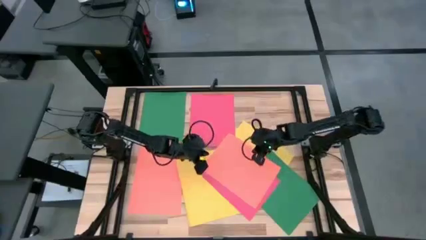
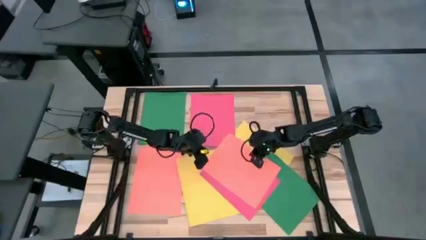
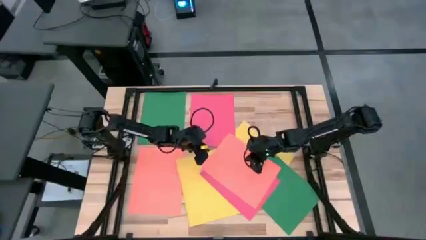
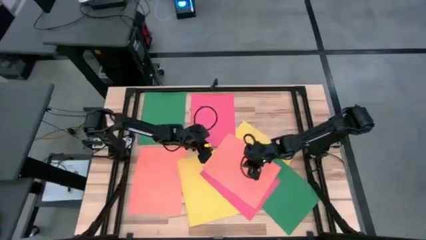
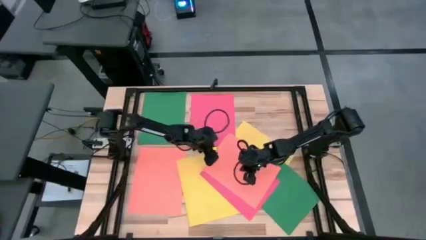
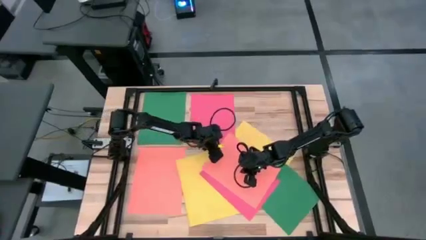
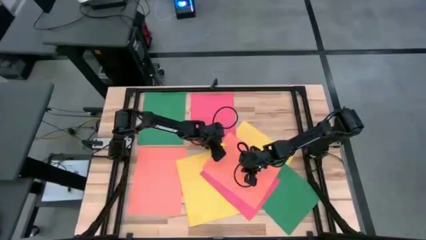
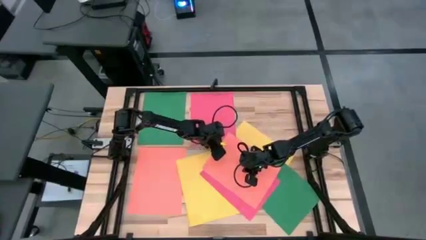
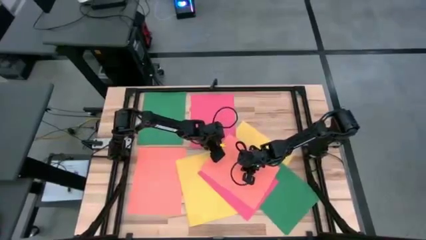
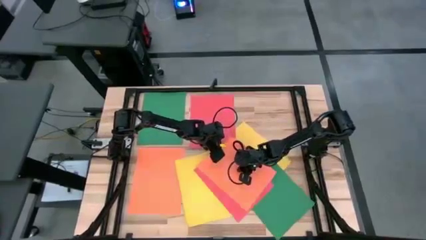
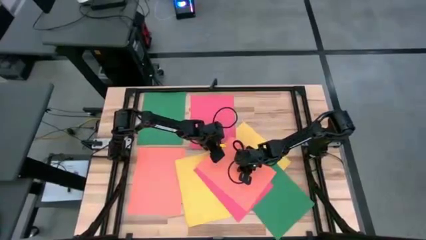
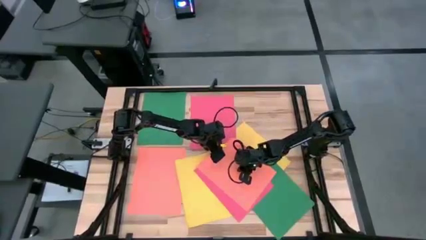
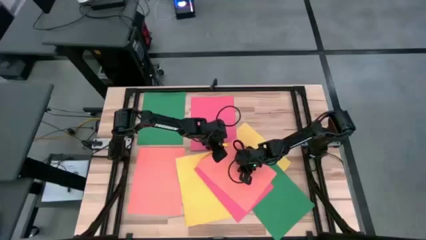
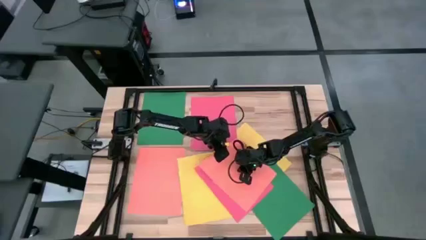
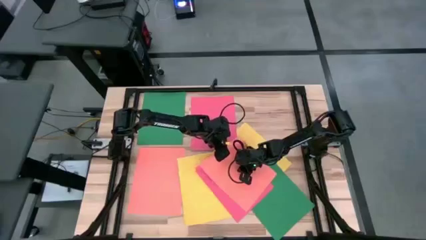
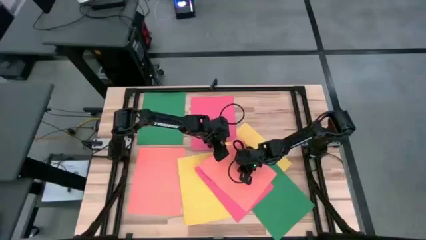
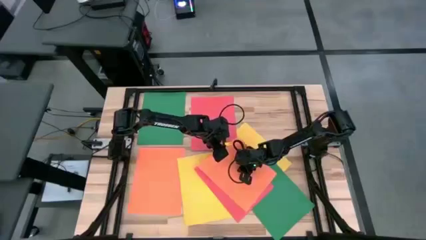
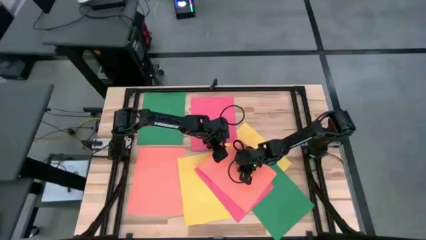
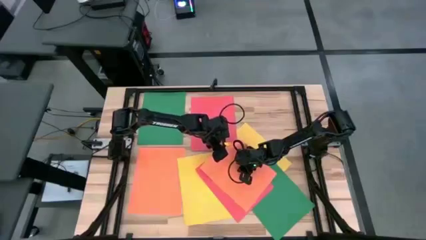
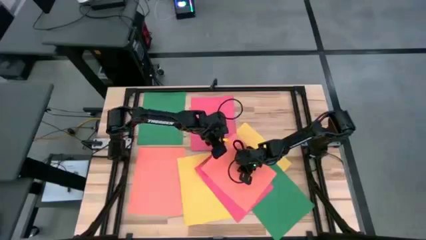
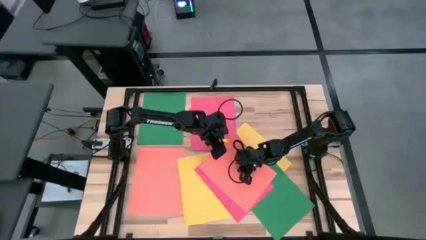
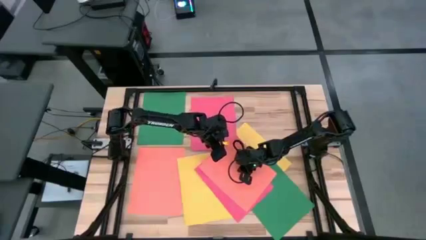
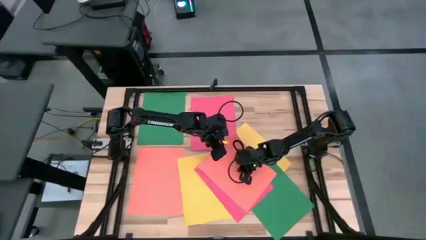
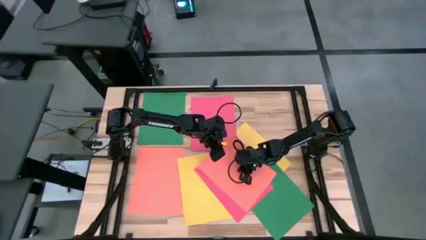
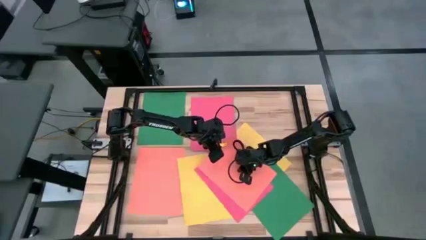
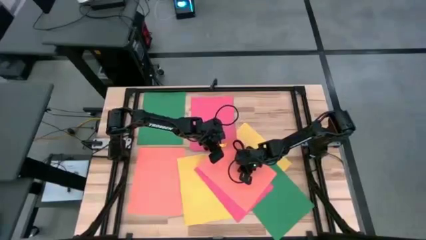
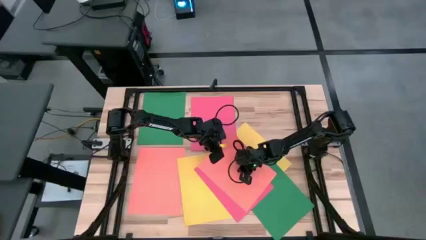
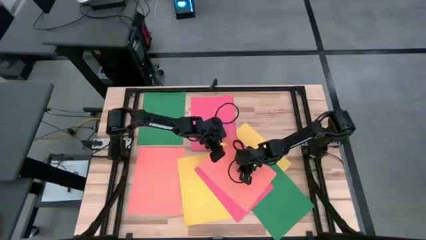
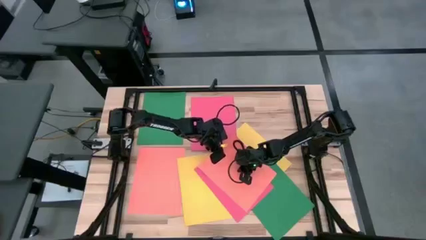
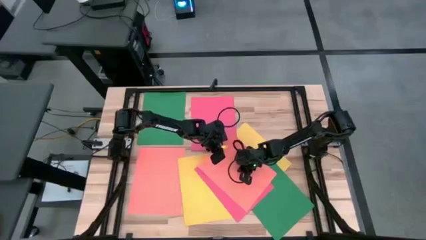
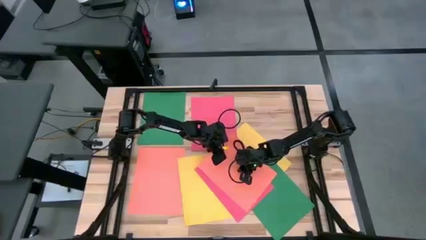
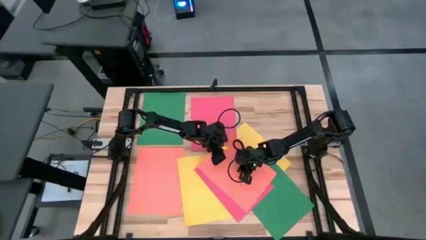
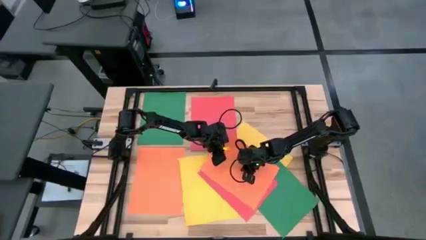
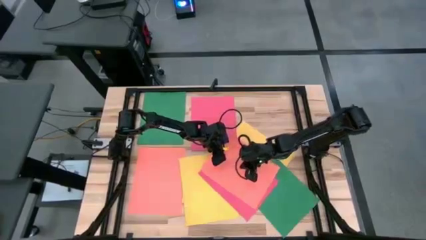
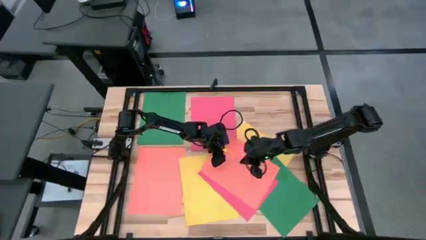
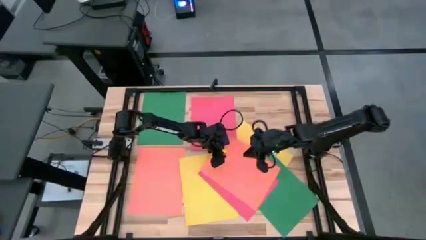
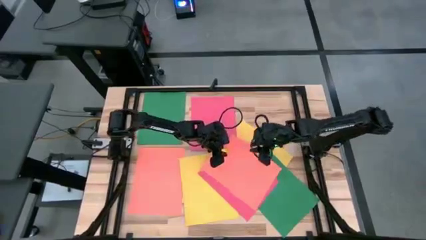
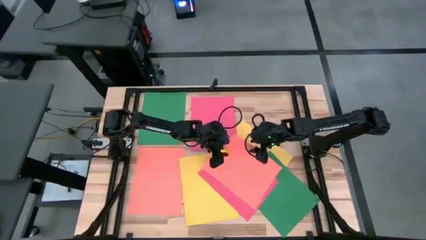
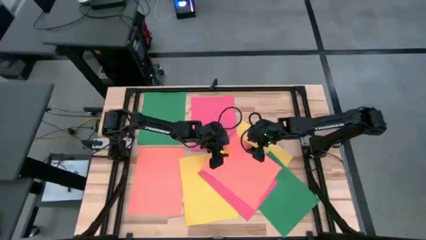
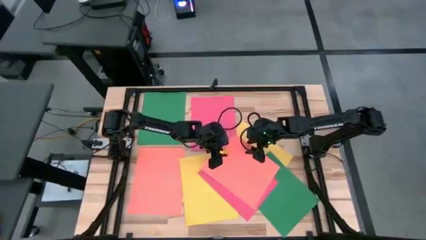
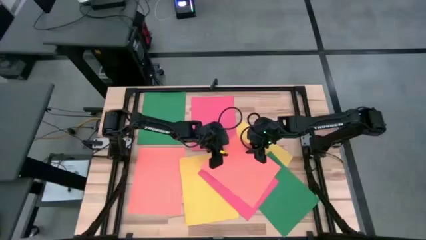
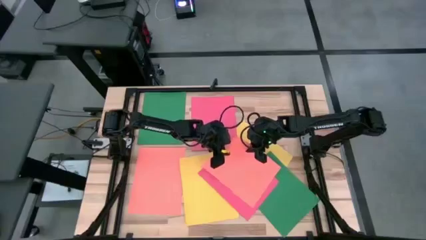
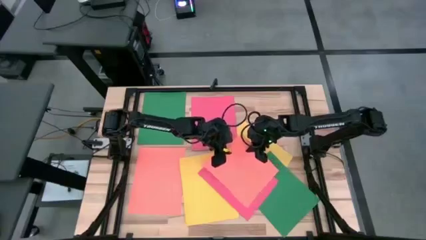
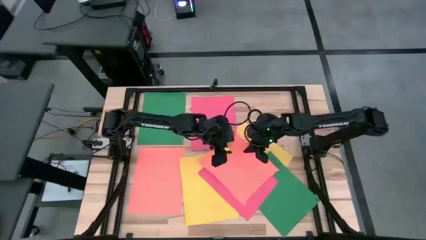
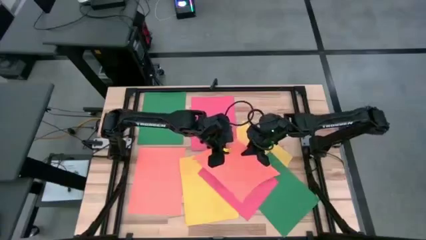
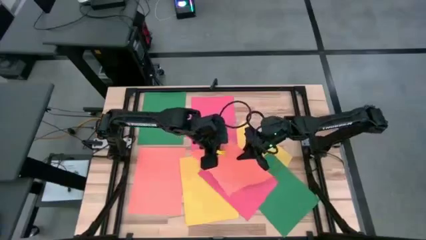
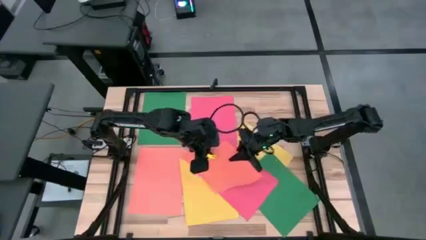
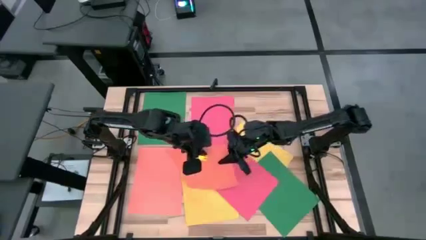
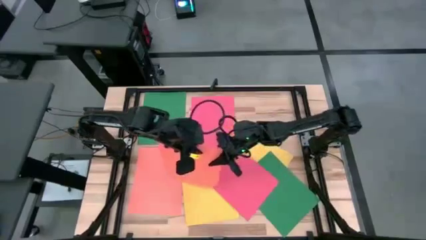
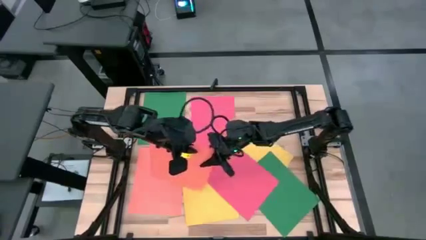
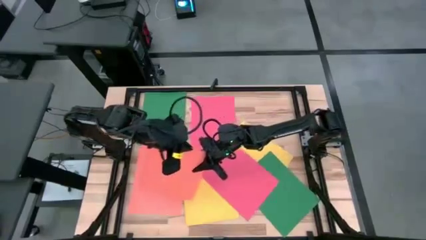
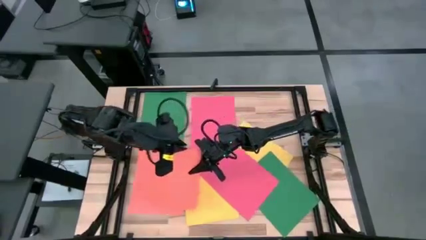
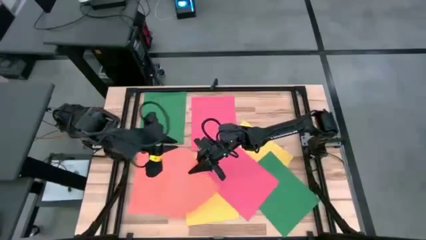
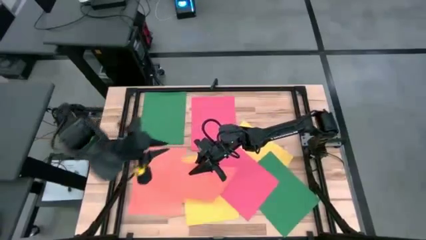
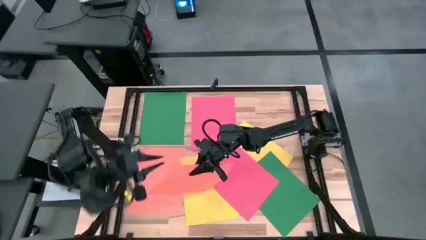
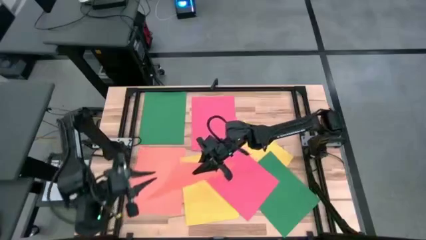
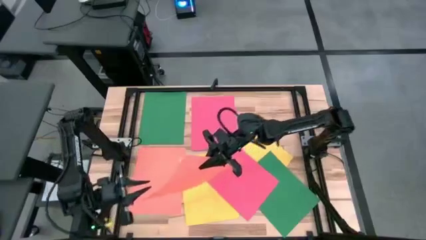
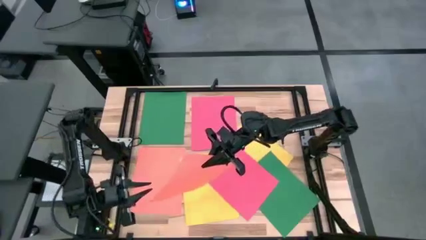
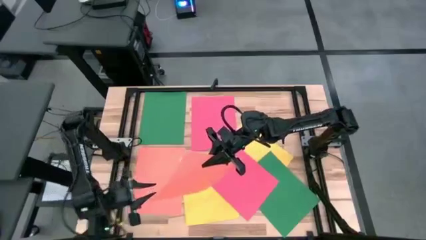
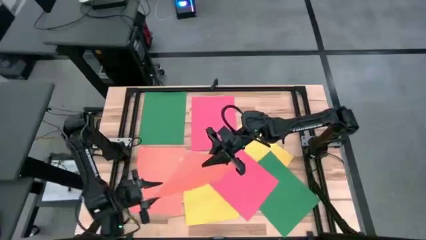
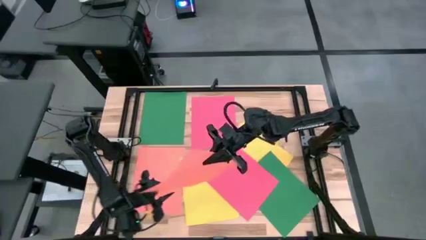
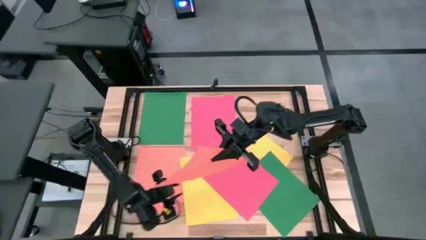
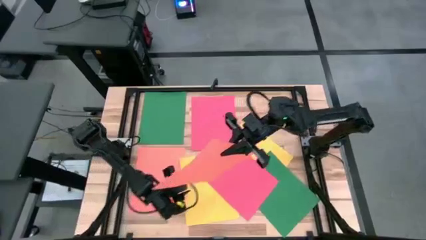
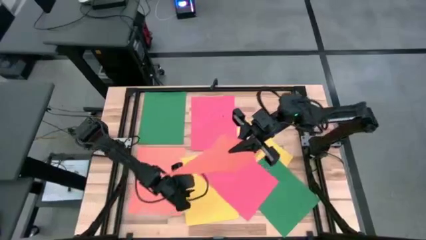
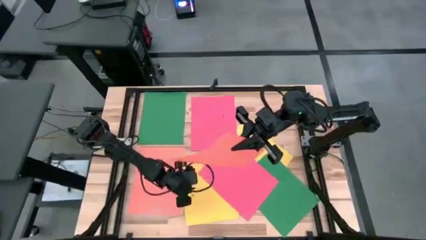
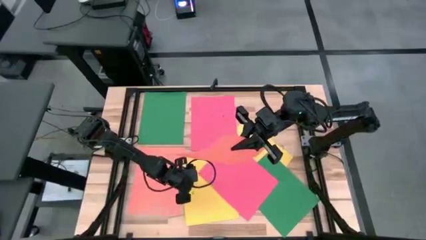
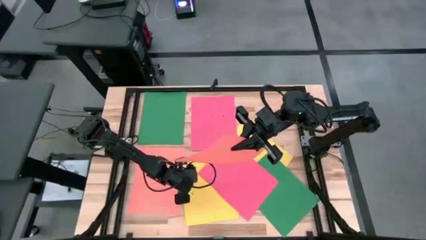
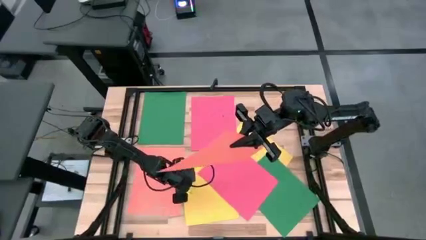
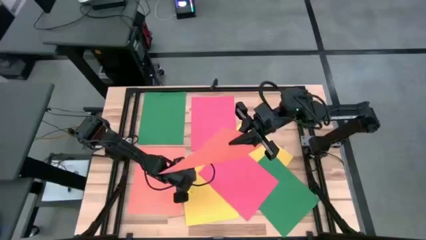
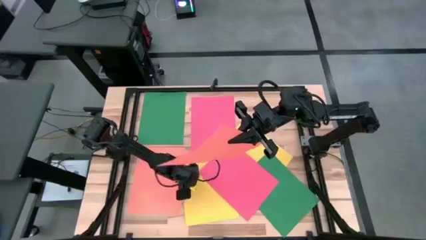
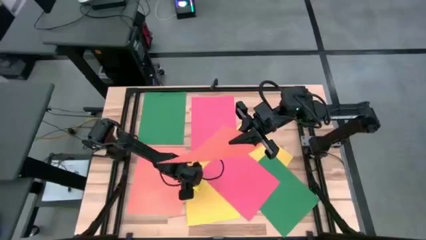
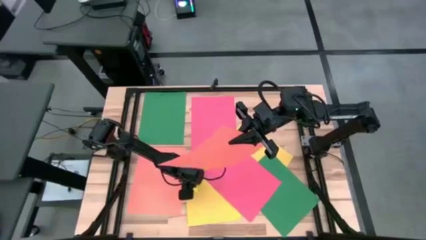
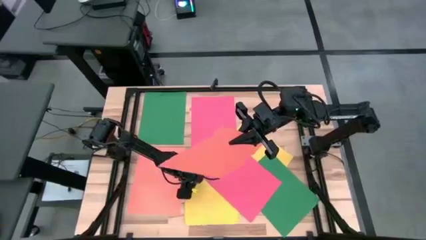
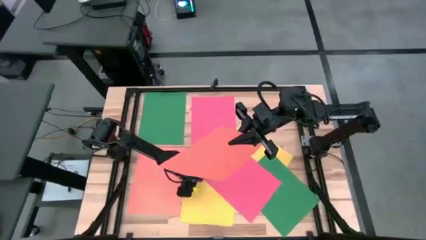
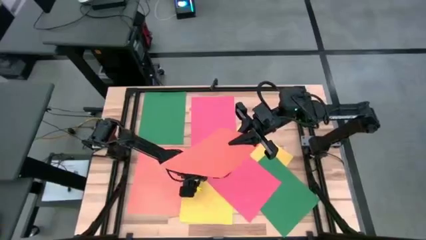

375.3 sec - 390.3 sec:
Task: Organize paper
Stack the orange paper on top of the orange paper
